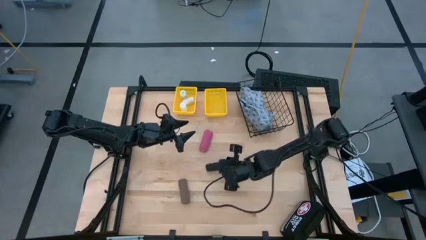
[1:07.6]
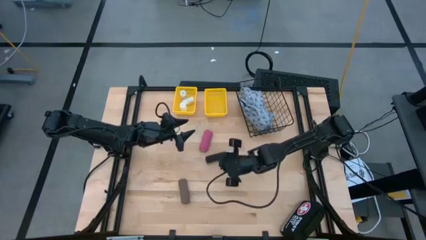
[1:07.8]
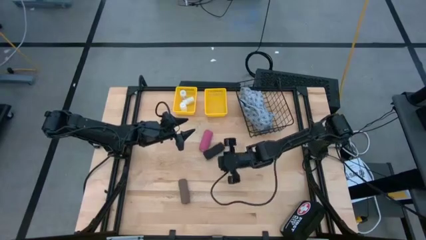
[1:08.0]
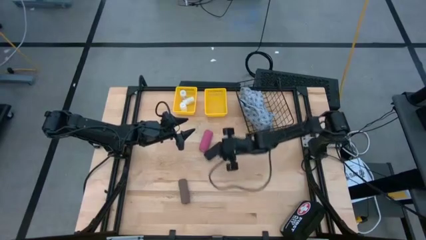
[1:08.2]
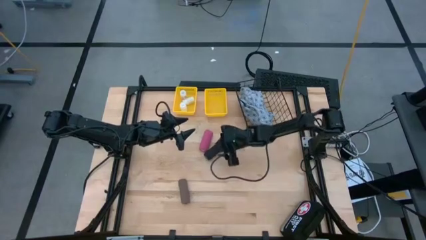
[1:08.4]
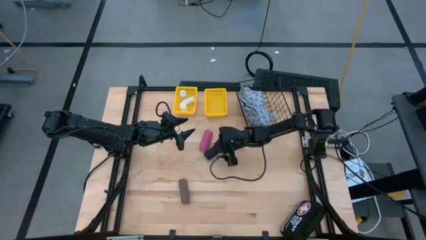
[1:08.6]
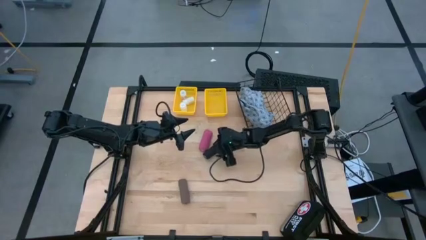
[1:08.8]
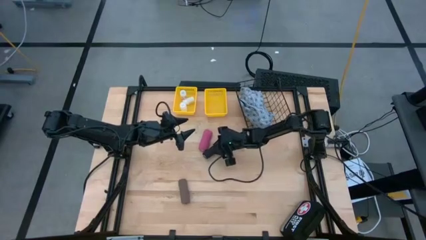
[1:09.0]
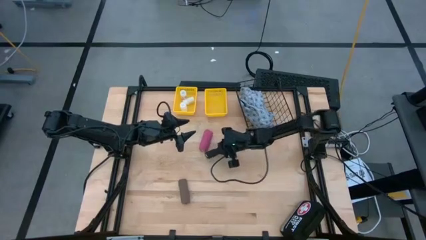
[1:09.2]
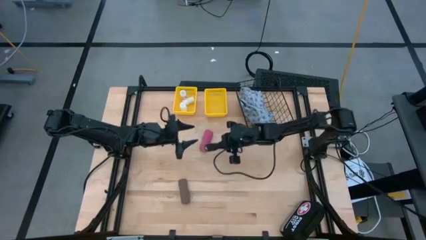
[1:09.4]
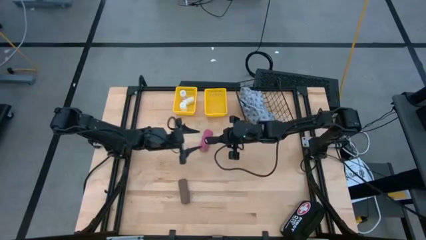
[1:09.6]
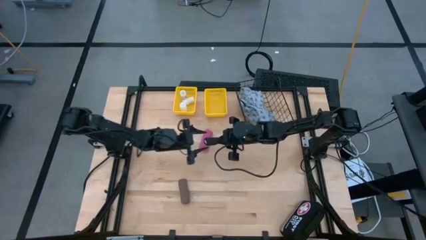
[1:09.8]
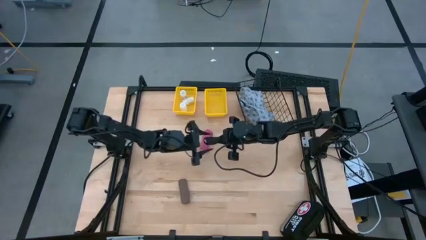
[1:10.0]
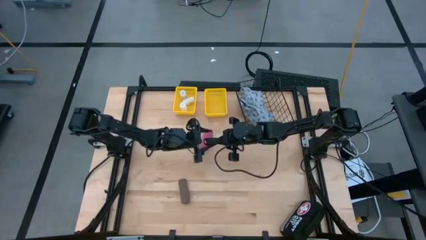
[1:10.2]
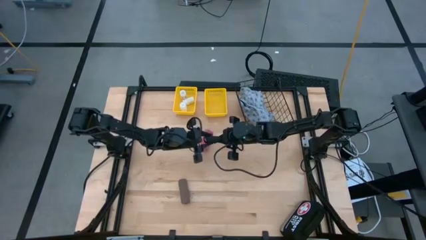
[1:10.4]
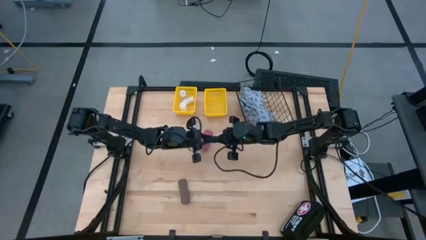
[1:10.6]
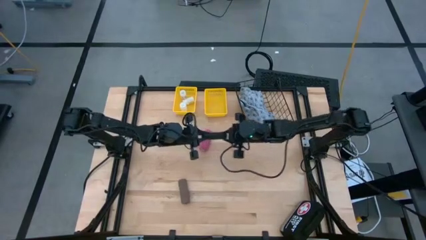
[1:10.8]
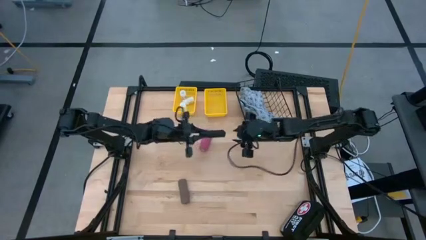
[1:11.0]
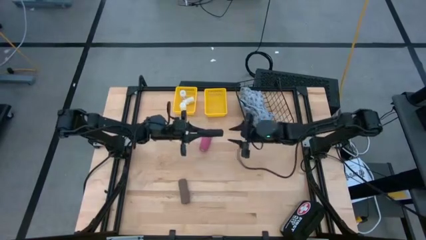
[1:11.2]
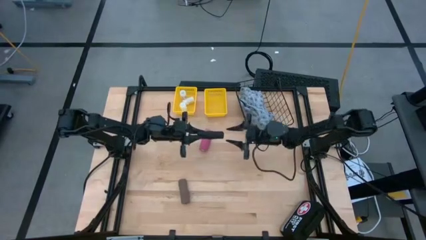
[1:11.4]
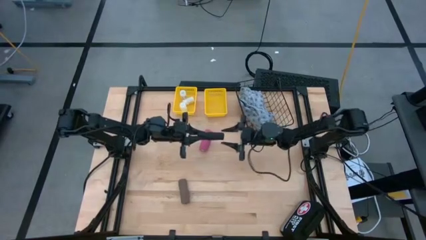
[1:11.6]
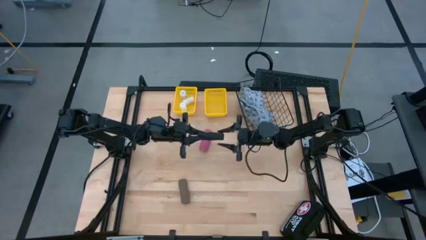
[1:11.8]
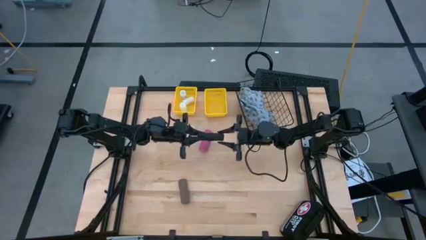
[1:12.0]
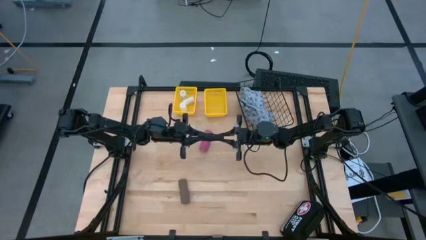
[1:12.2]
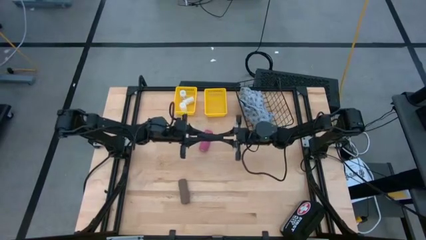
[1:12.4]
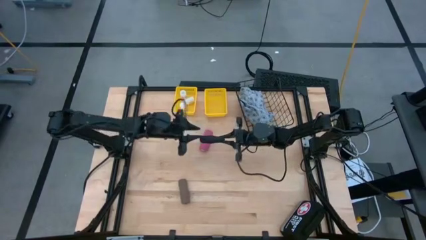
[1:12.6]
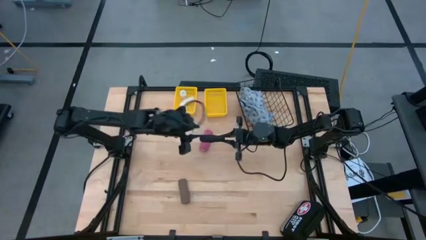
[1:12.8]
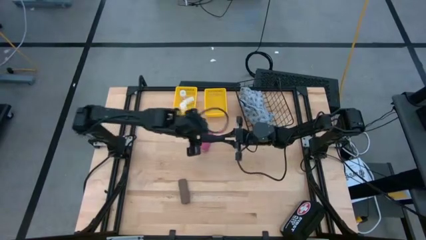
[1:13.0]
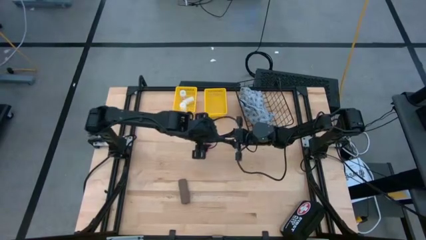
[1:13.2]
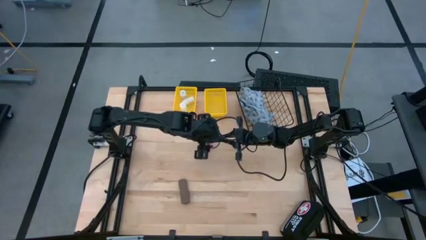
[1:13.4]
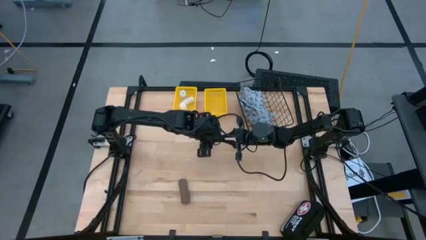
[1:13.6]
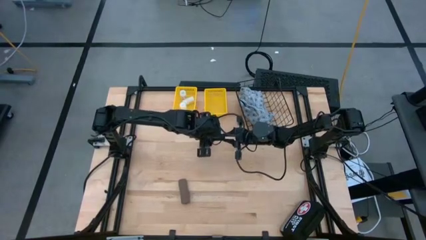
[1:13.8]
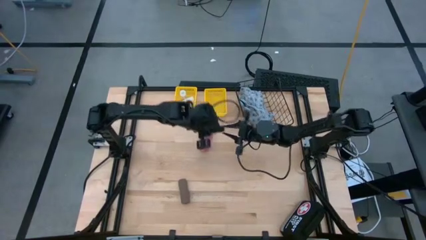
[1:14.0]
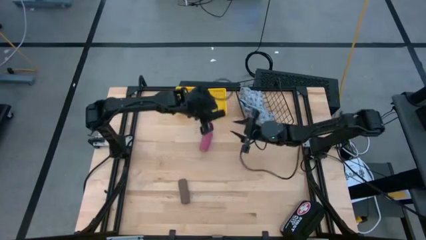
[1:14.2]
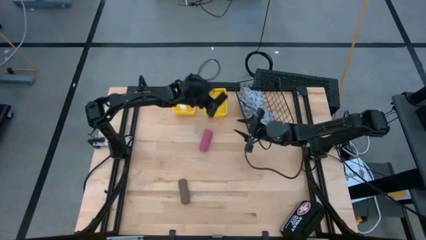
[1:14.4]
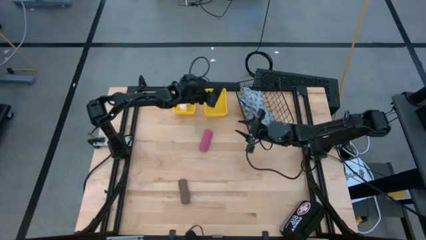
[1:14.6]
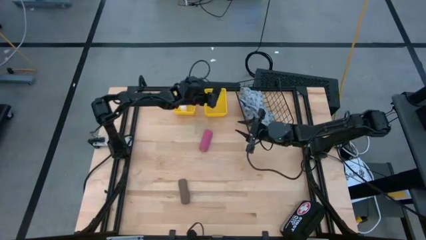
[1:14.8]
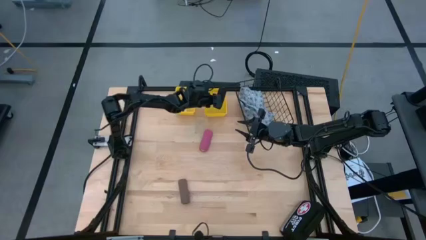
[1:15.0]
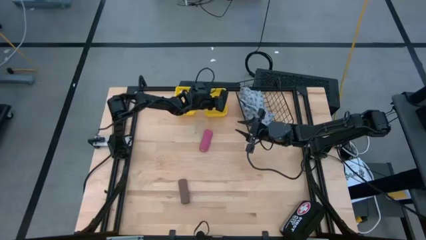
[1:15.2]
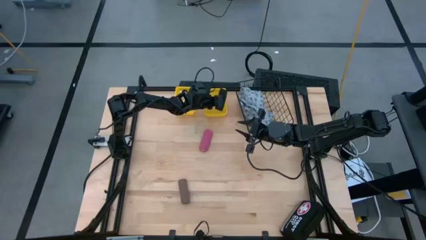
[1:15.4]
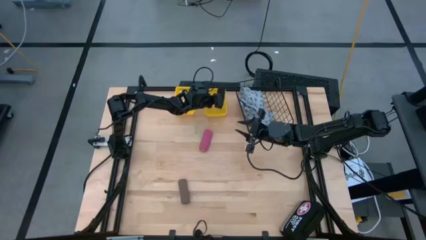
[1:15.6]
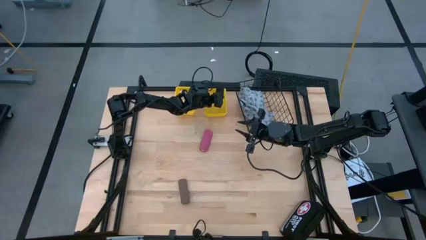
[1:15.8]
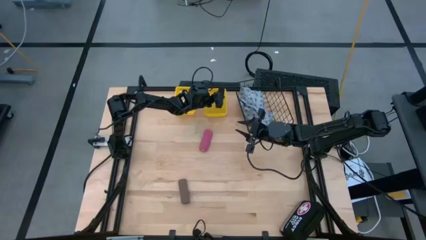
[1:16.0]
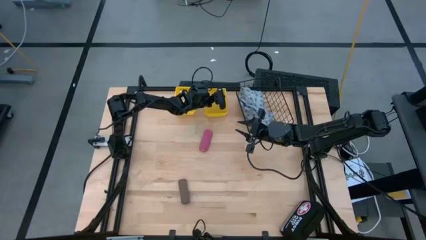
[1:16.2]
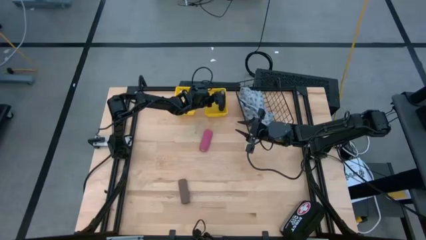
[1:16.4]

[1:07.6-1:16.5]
Task: Pick & Place Medicine items
Put the black bandage into the right yellow basket

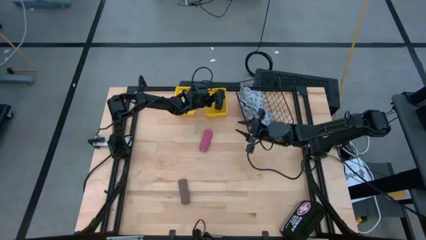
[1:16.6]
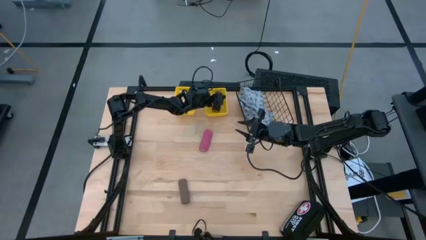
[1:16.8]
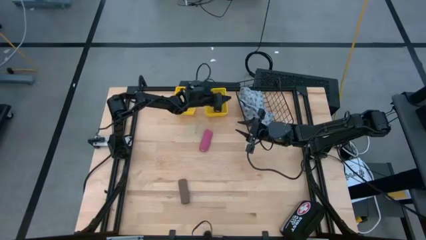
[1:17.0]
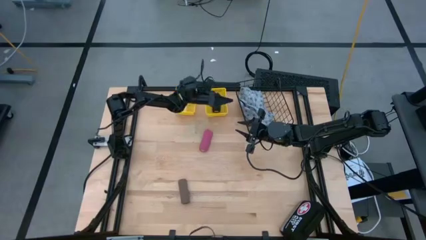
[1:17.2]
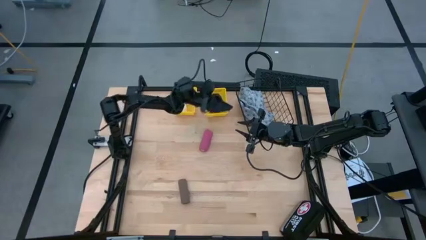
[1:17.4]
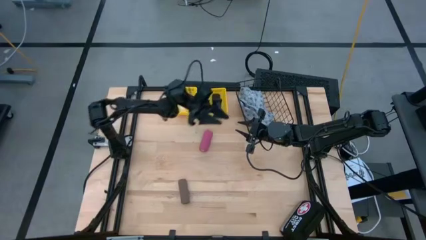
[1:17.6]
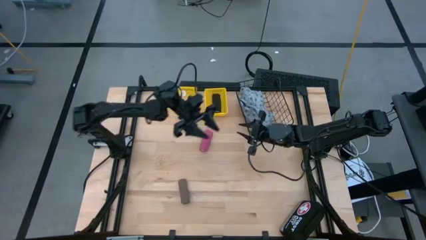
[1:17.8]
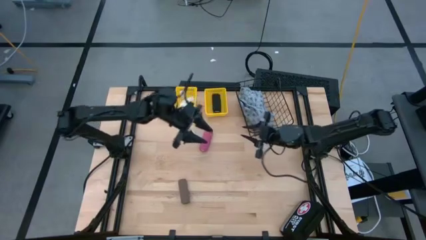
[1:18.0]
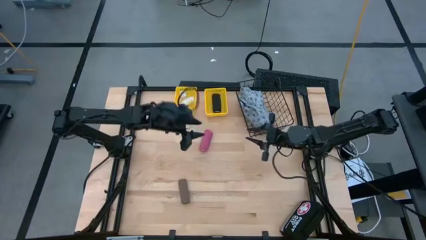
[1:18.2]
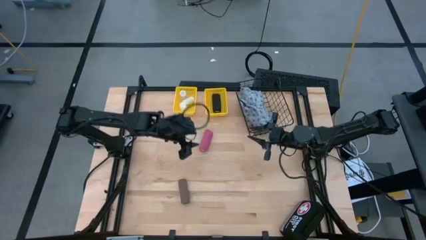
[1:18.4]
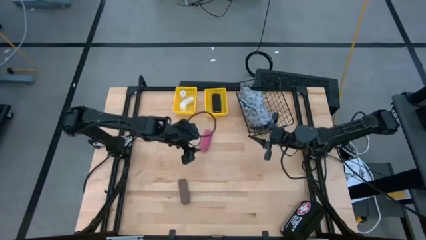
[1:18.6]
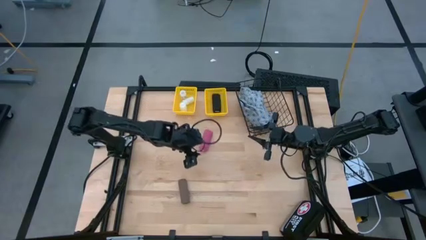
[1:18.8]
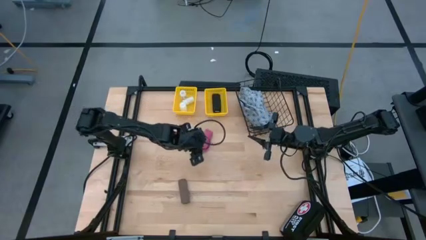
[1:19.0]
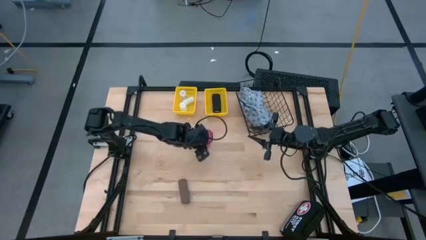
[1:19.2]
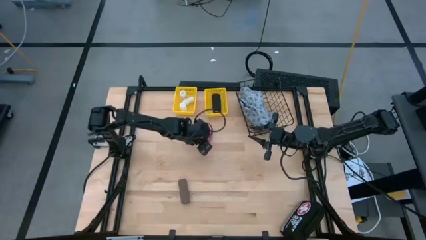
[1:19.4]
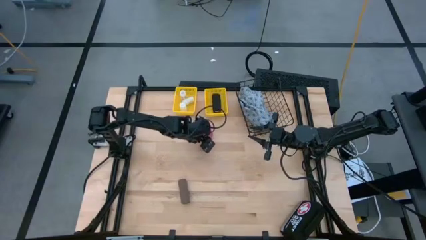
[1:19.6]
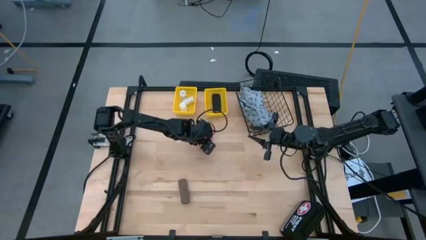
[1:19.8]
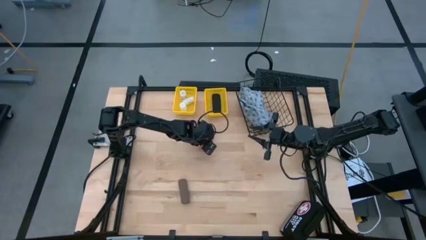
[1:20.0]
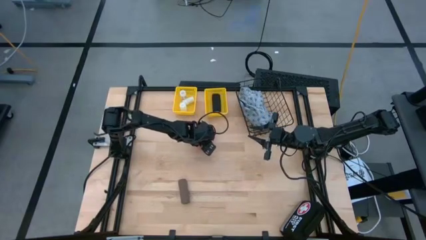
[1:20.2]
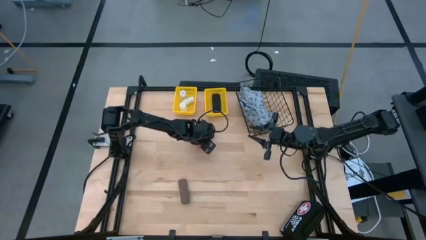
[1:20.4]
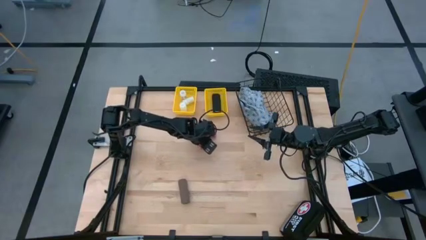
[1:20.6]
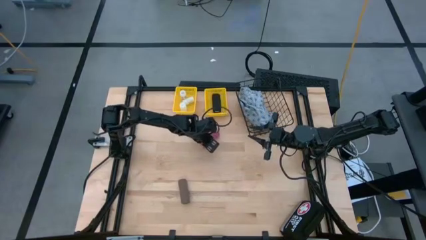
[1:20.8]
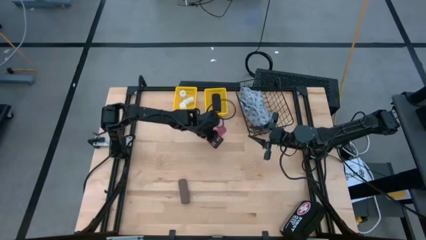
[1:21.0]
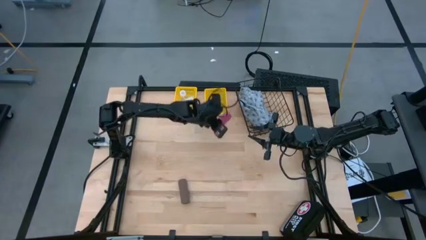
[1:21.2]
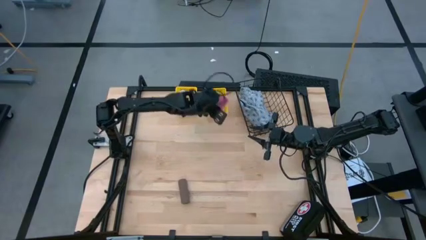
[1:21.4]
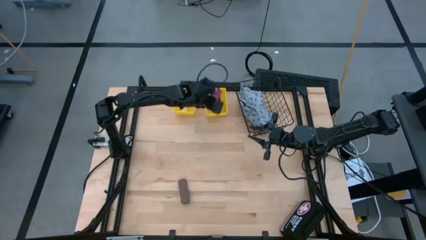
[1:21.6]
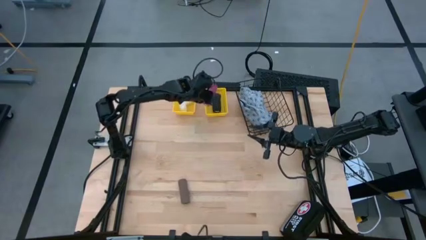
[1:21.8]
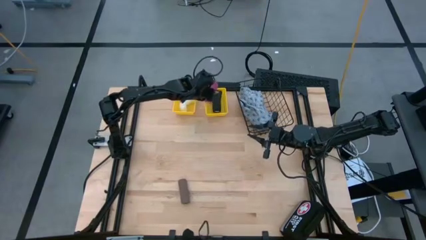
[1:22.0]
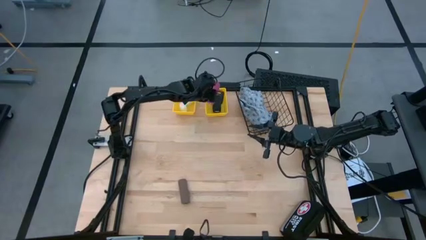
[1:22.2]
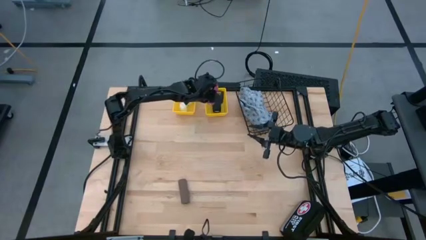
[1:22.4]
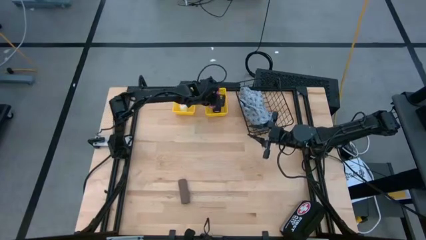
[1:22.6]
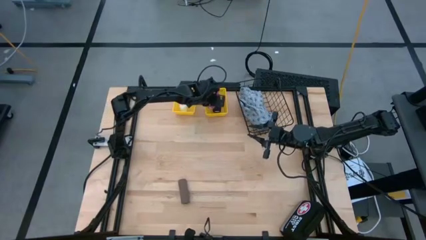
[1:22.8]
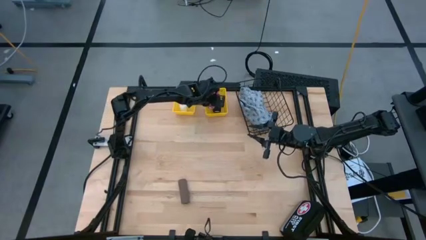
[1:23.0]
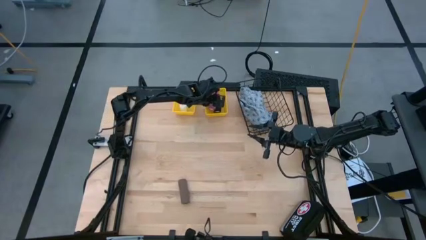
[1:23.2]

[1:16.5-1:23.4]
Put the pink bandage into the right yellow basket
